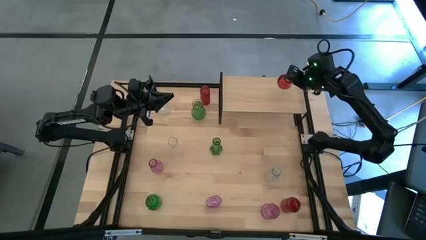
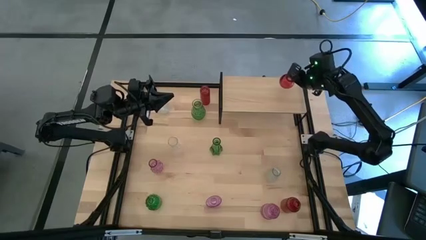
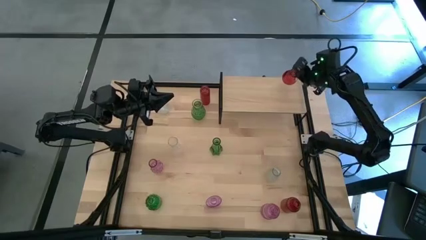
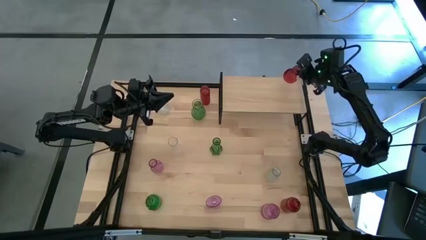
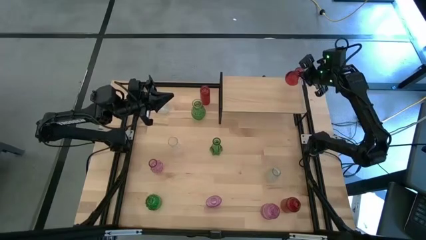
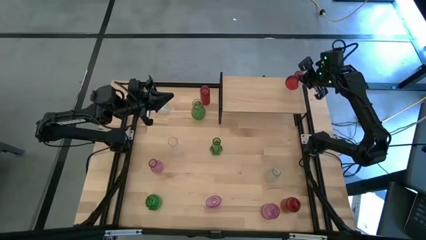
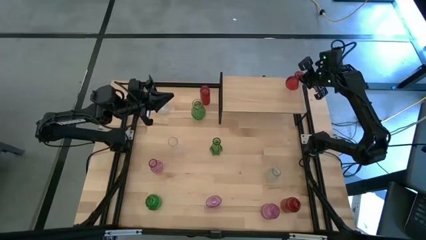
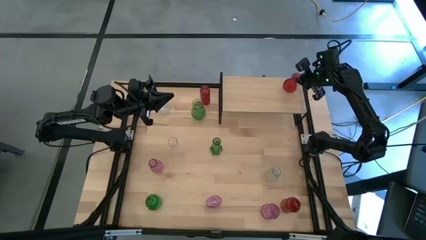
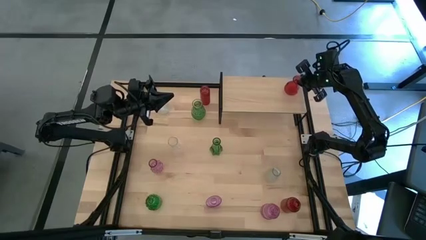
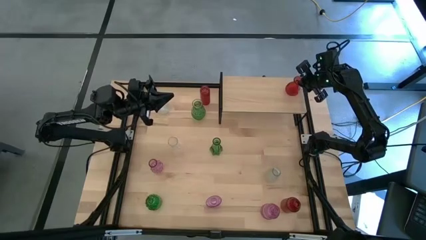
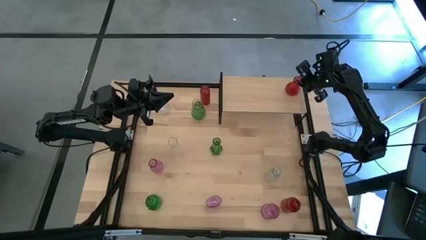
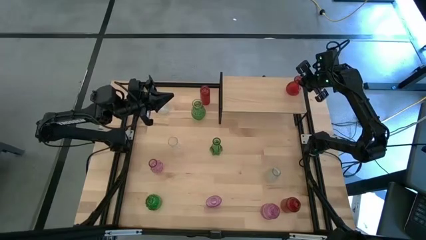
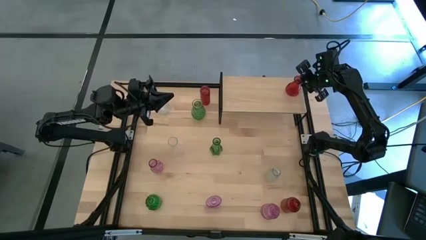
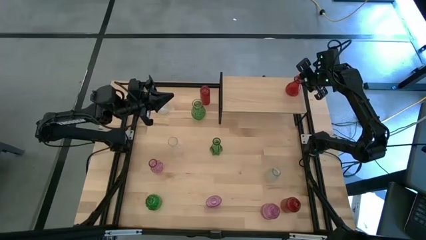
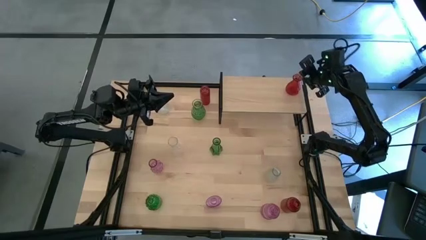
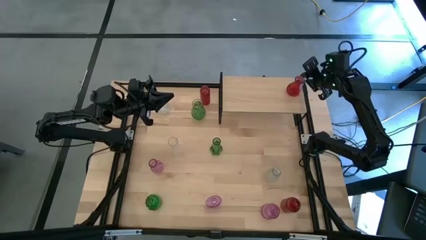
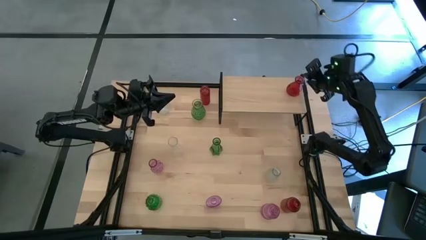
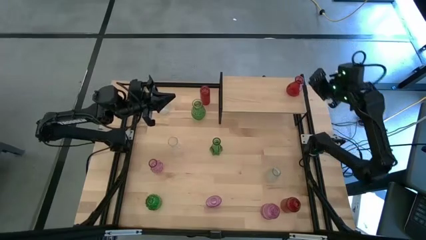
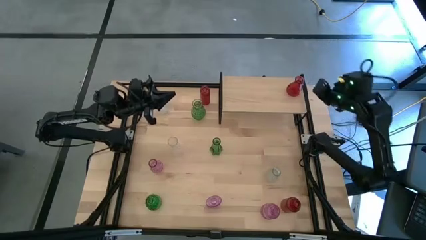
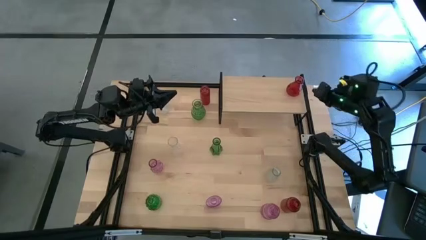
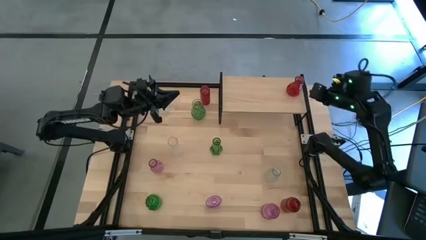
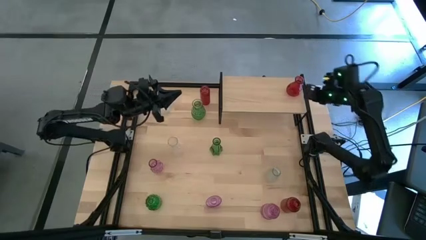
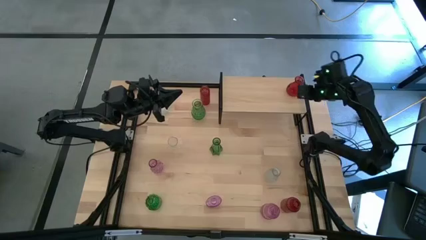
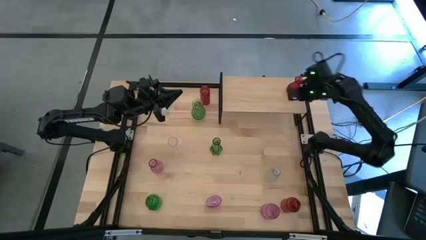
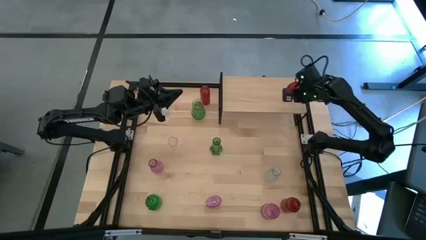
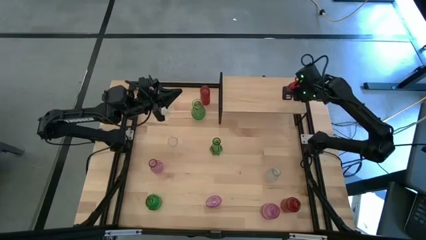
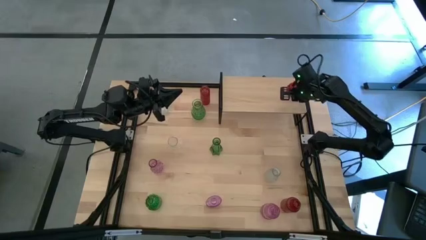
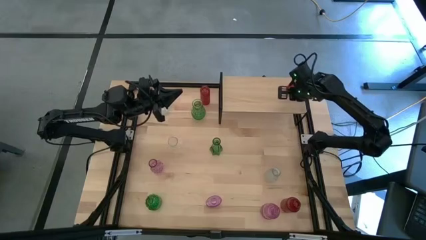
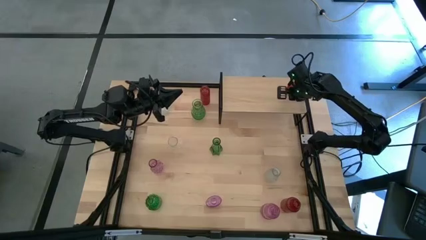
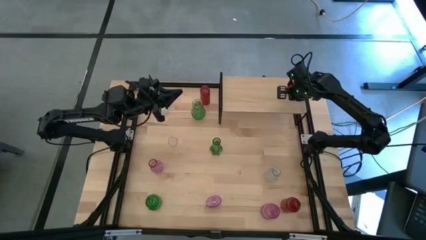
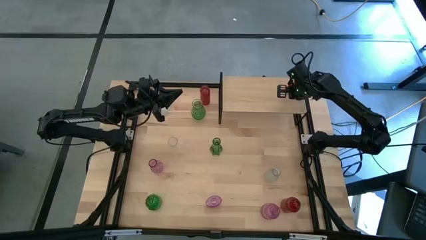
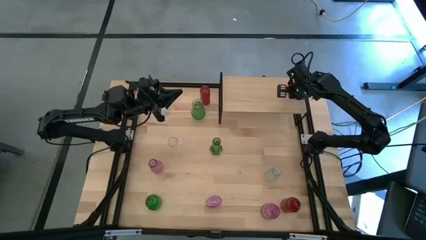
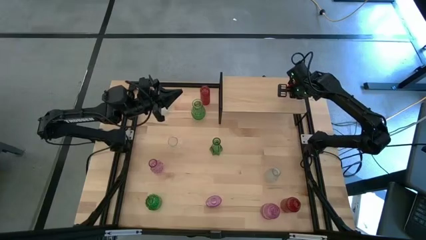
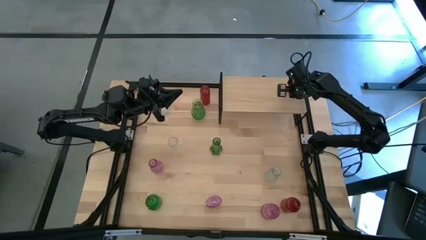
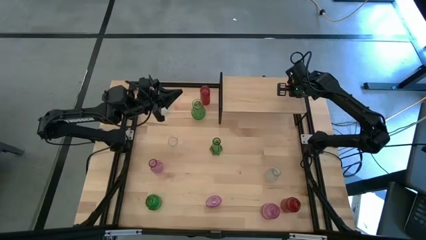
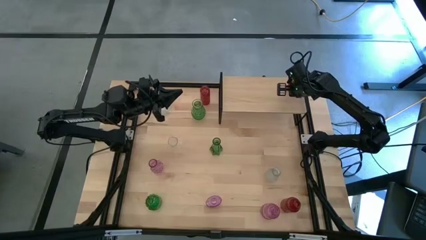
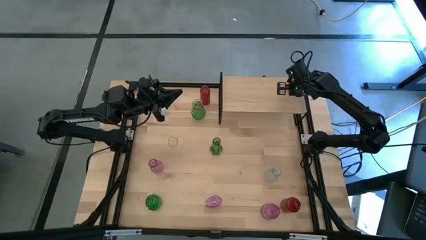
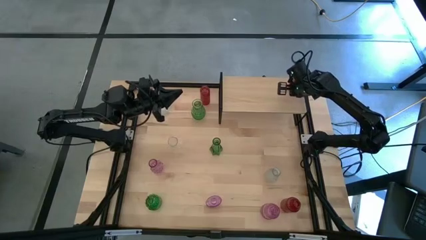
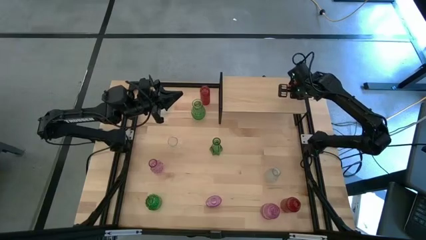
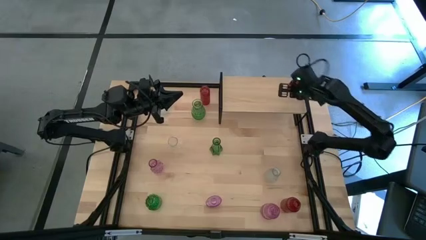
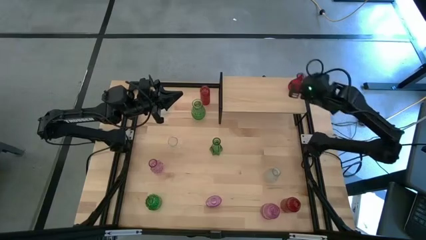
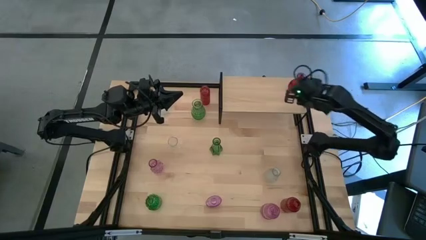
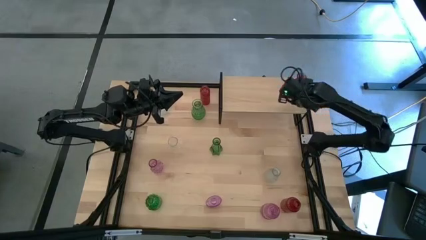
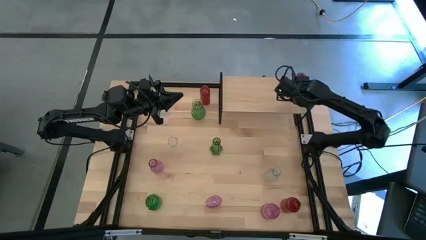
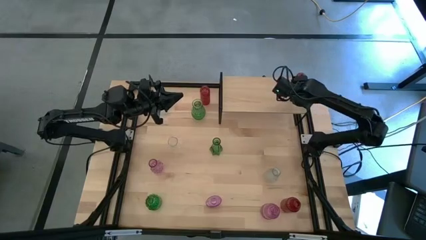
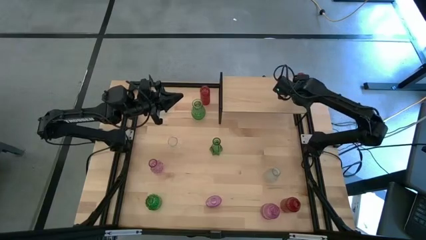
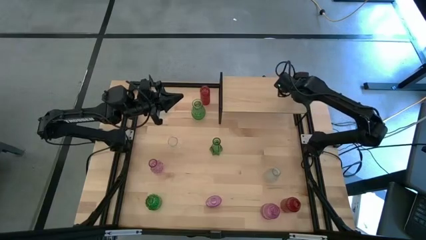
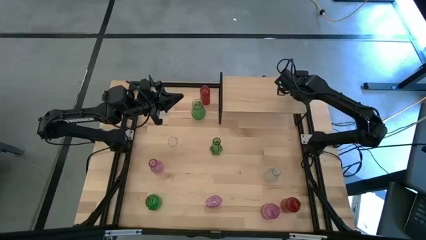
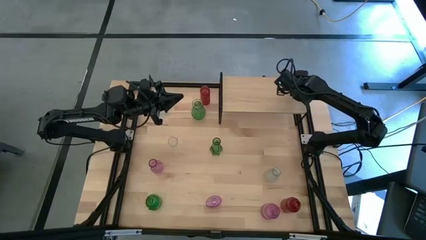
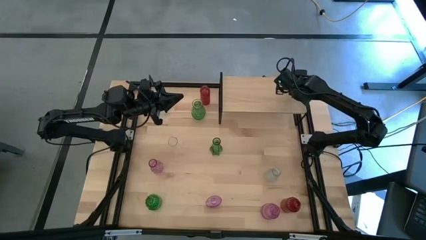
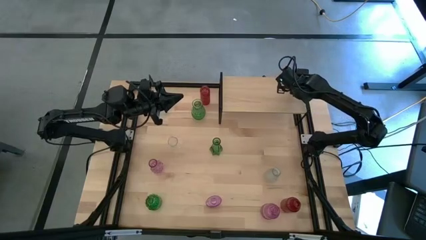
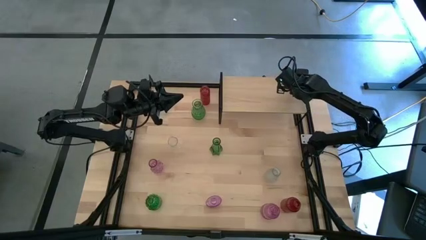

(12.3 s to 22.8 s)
Task: sort vases onto shelf
Put the middle right red vase on the shelf

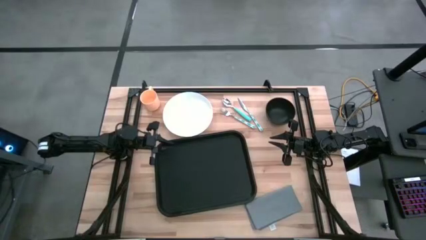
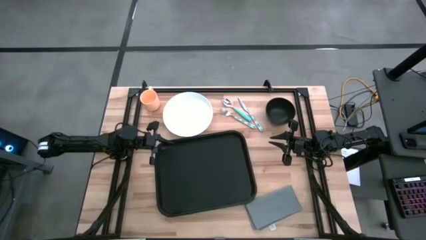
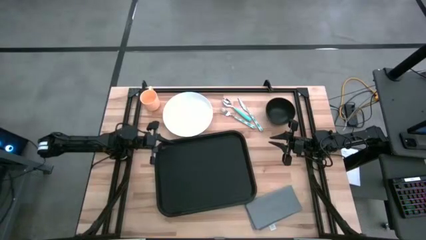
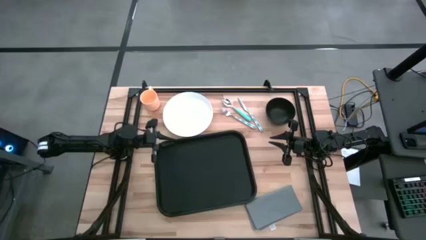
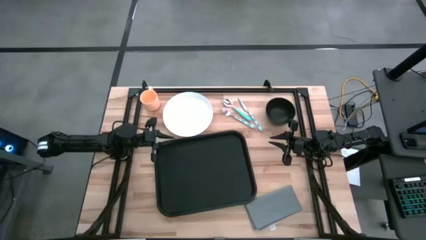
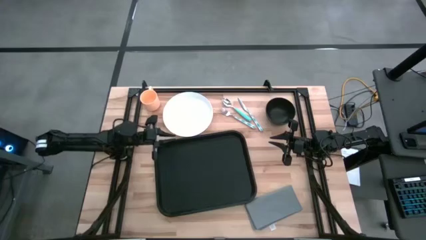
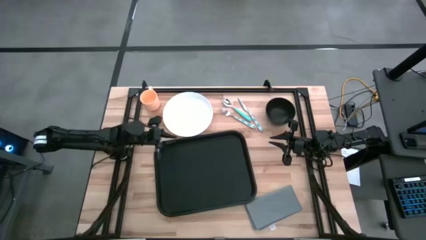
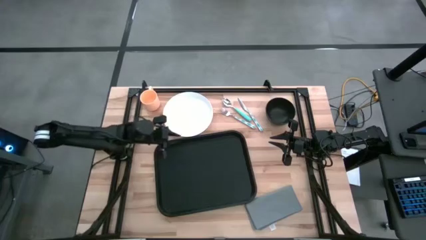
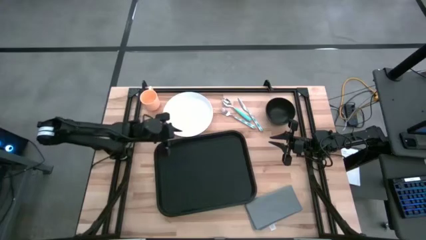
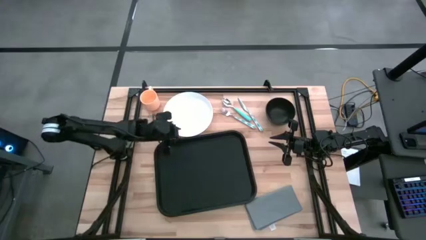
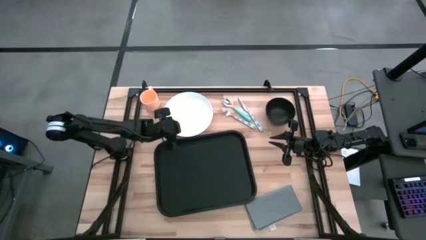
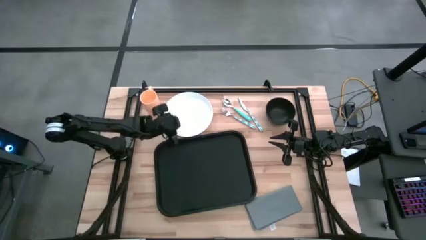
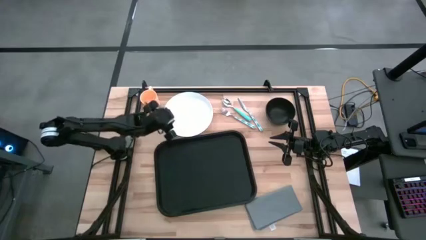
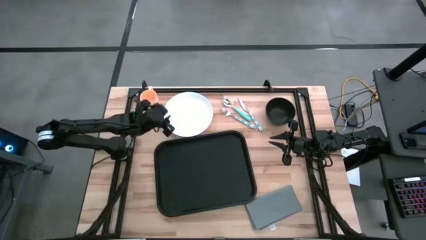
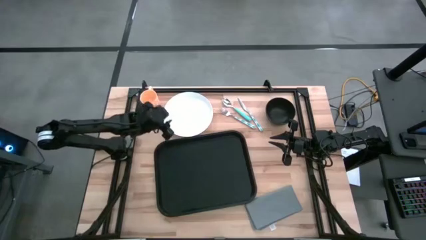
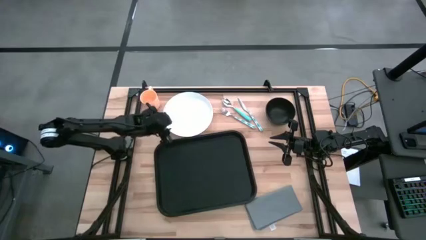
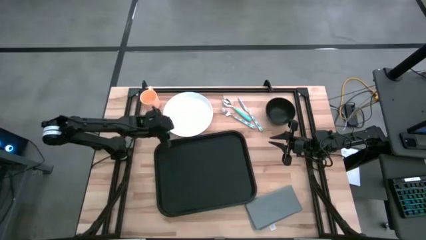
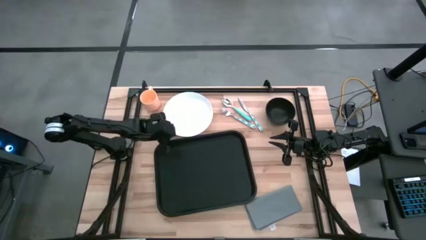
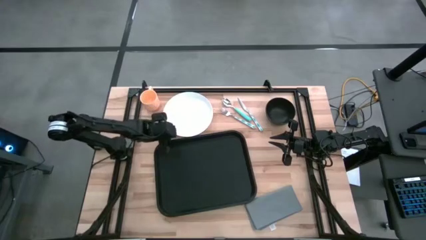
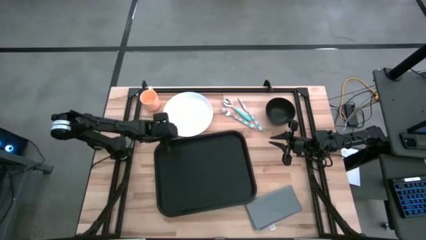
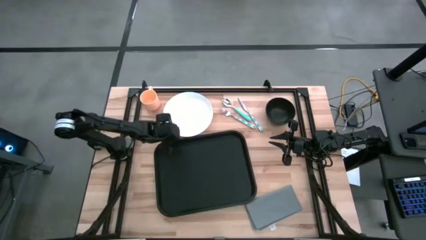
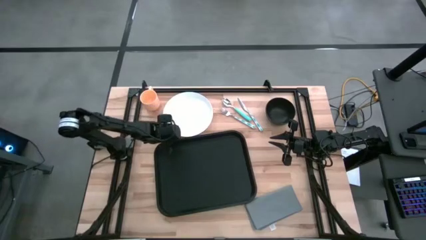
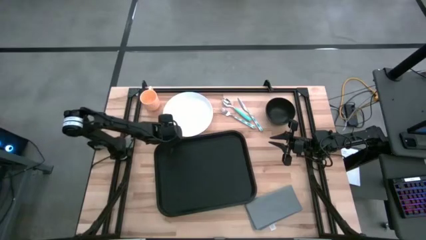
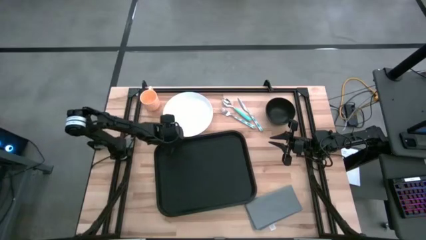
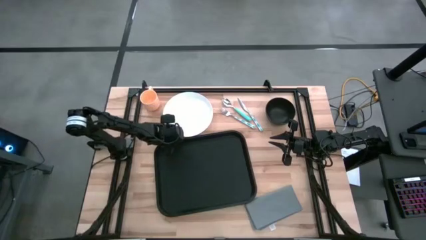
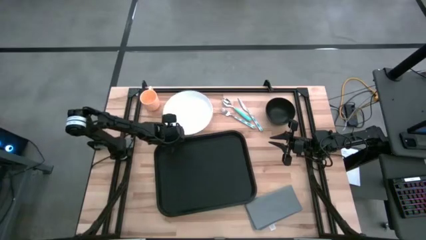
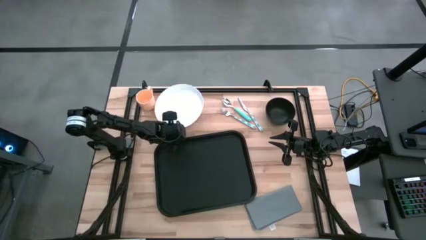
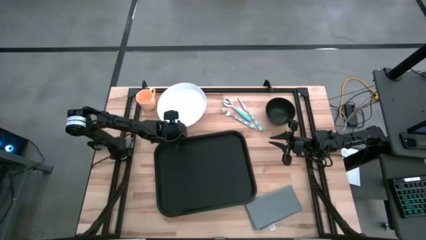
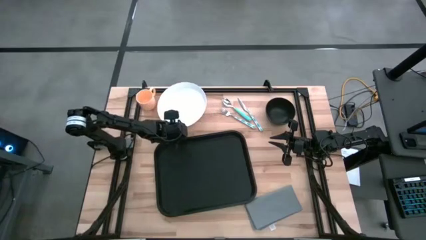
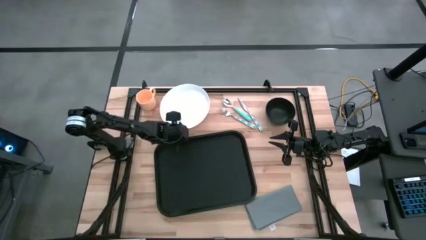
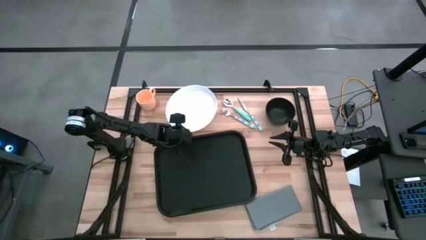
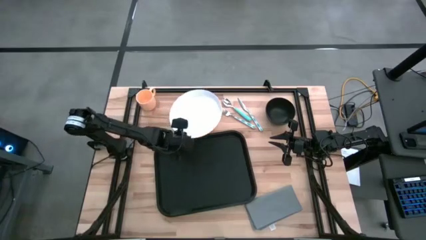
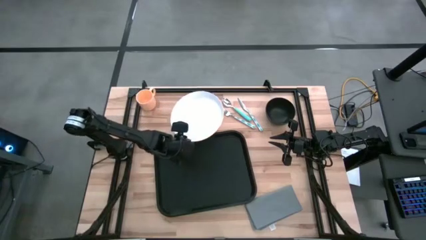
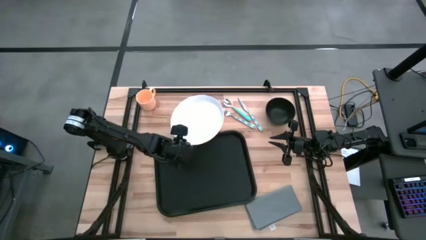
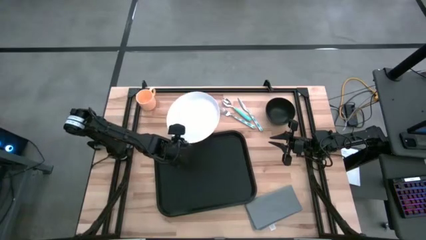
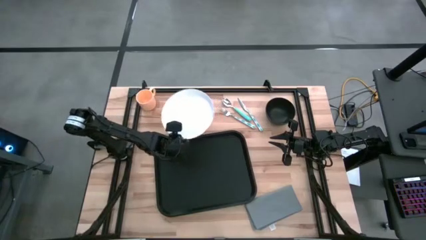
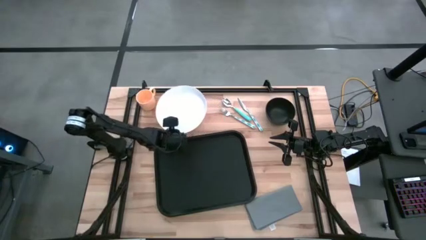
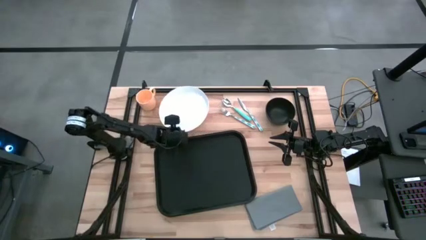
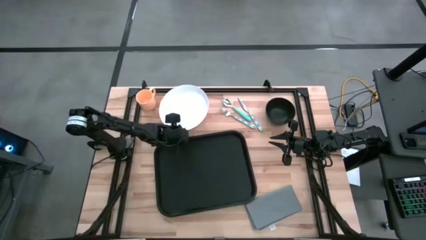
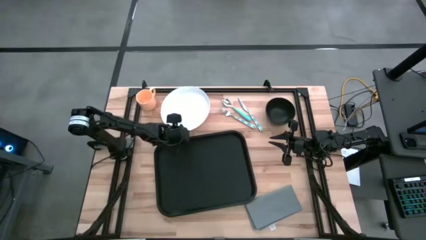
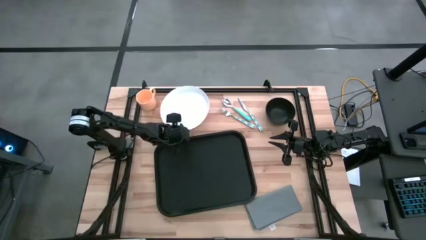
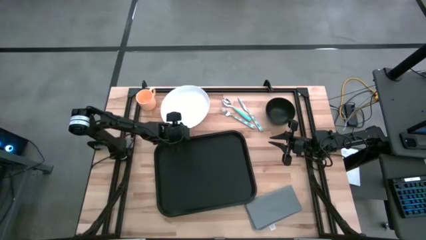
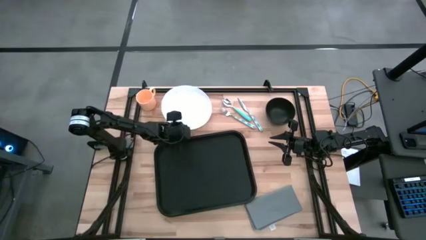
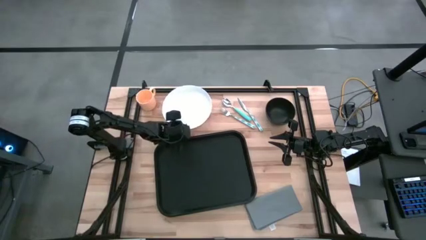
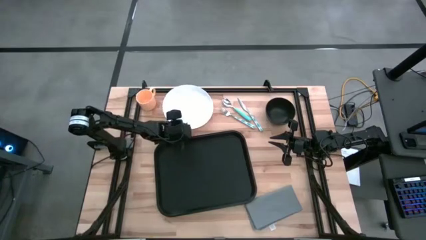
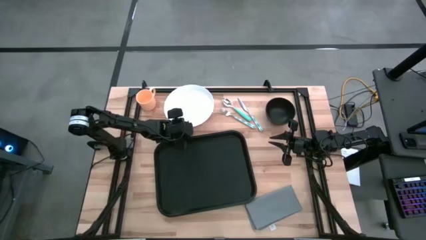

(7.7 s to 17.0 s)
Task: Set up tray
Put the white plate on the black tray
